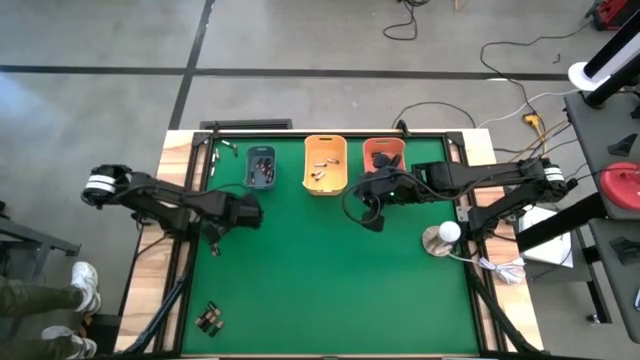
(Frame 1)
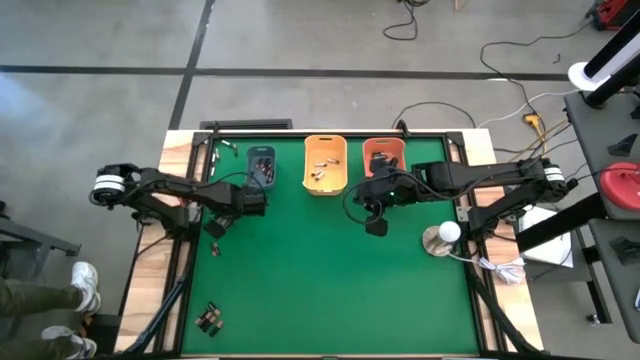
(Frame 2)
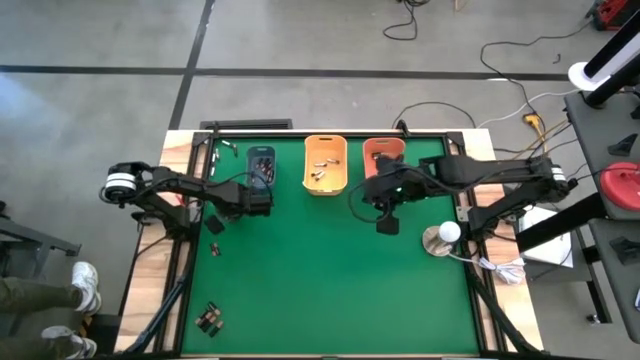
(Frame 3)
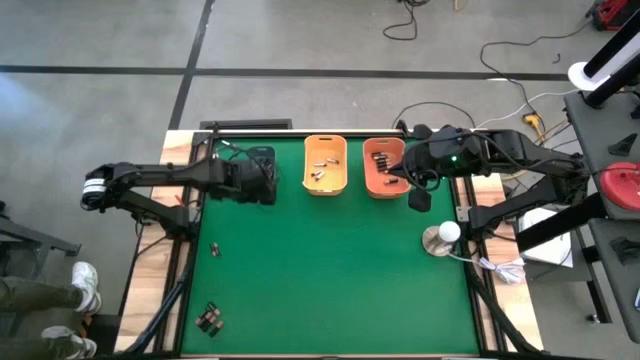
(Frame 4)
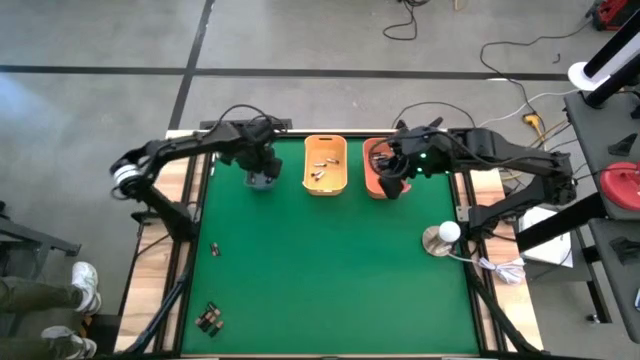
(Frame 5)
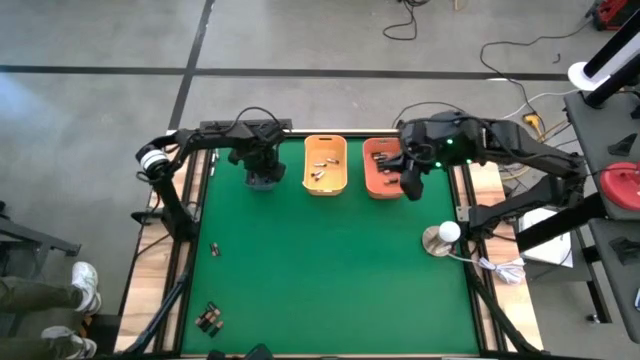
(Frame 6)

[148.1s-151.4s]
Task: Sort batteries
Put the black battery into the blue bin

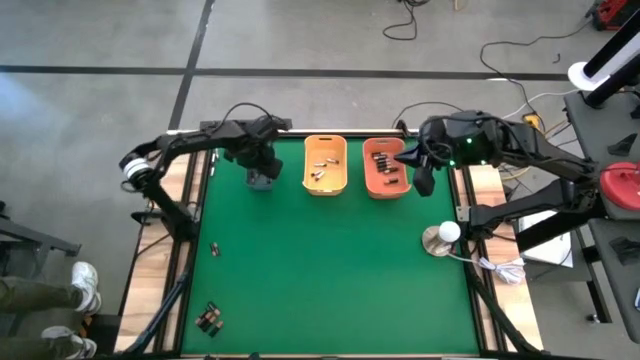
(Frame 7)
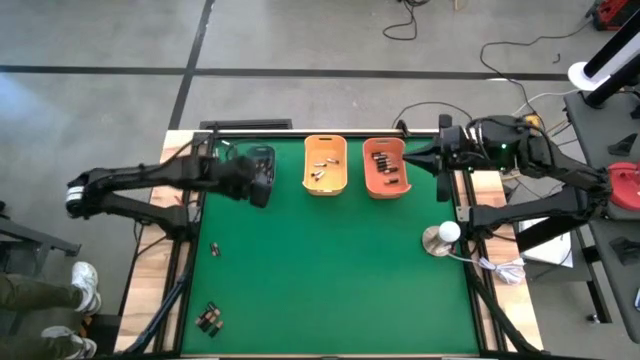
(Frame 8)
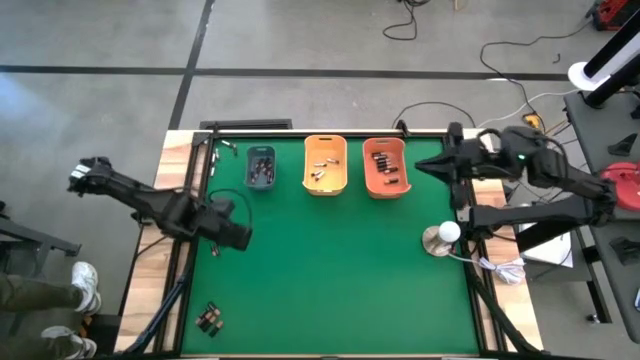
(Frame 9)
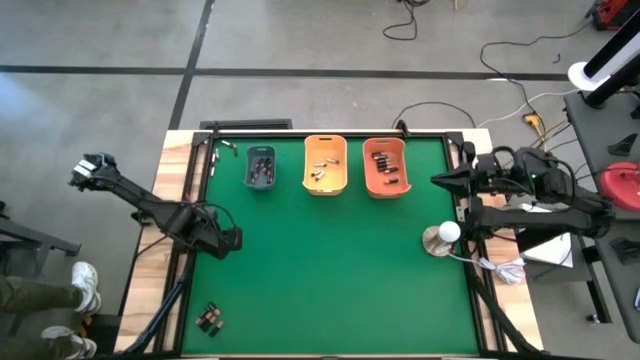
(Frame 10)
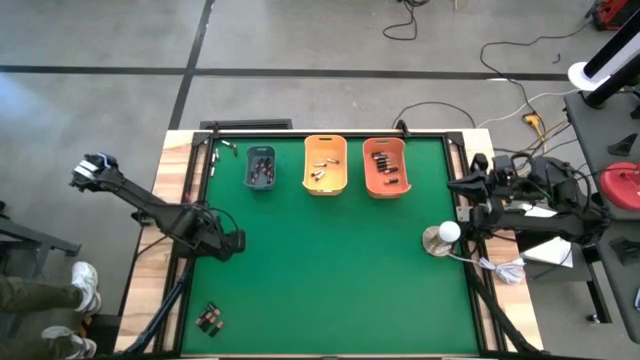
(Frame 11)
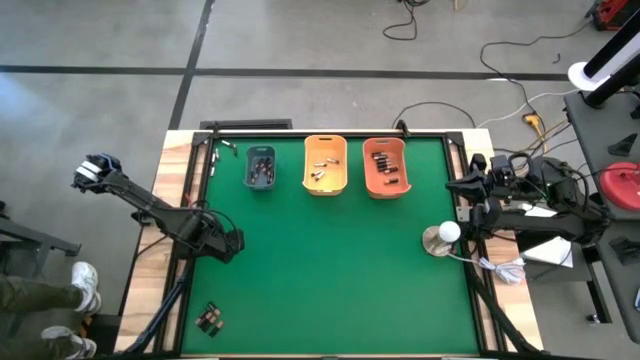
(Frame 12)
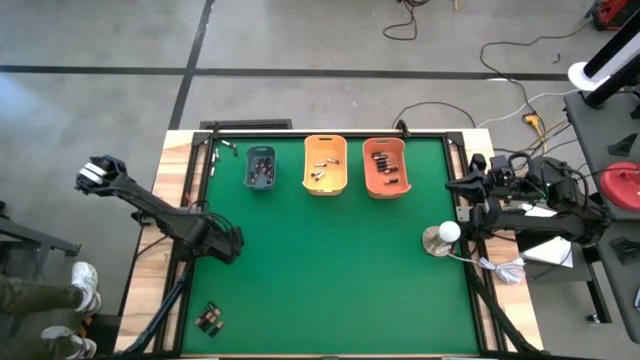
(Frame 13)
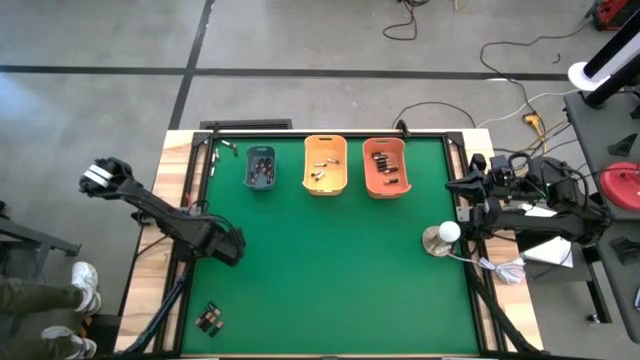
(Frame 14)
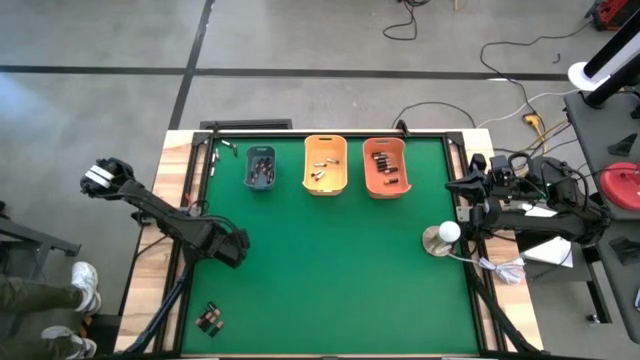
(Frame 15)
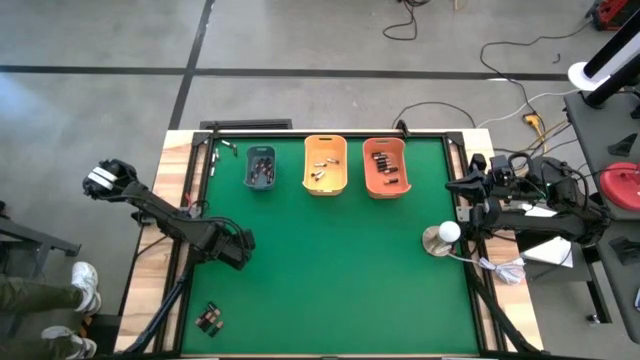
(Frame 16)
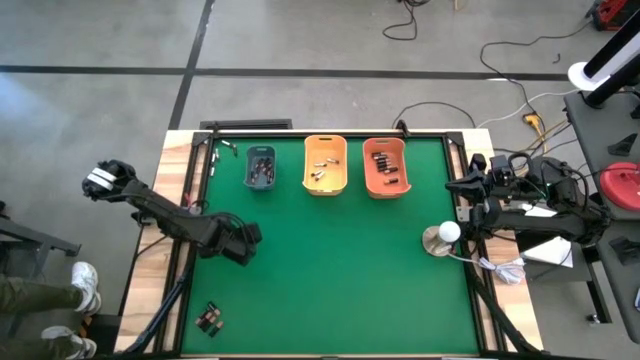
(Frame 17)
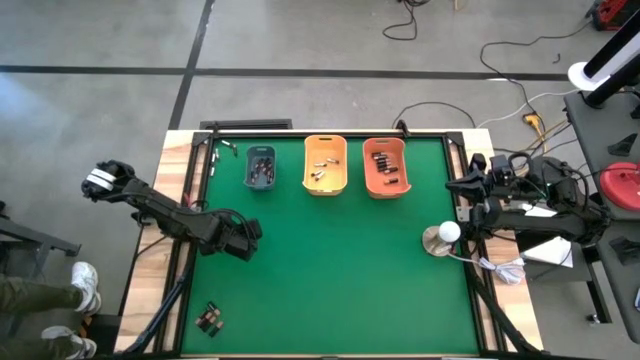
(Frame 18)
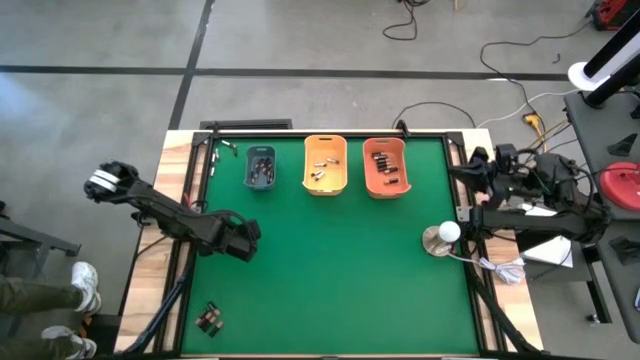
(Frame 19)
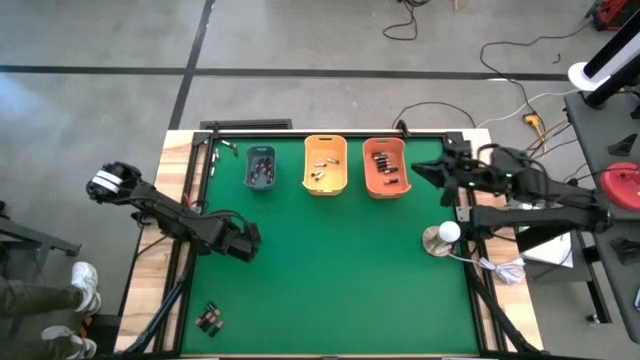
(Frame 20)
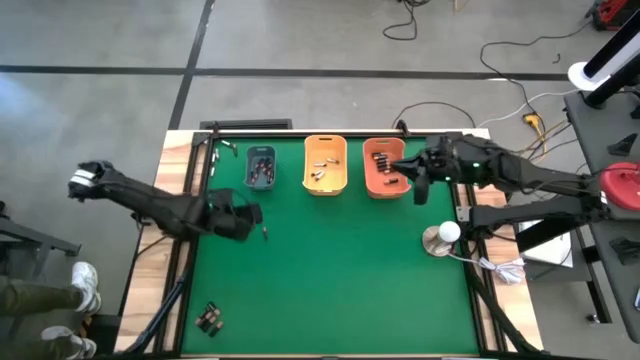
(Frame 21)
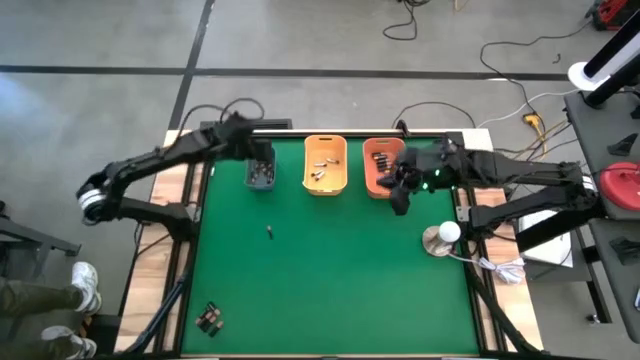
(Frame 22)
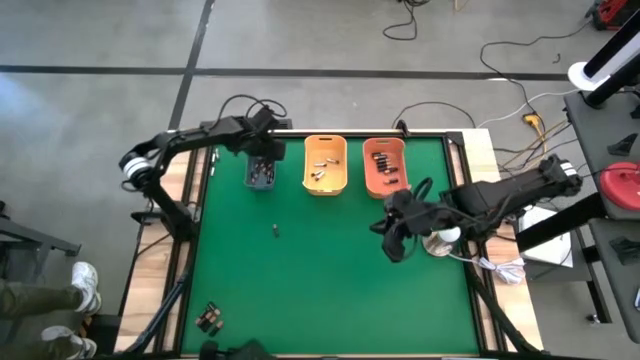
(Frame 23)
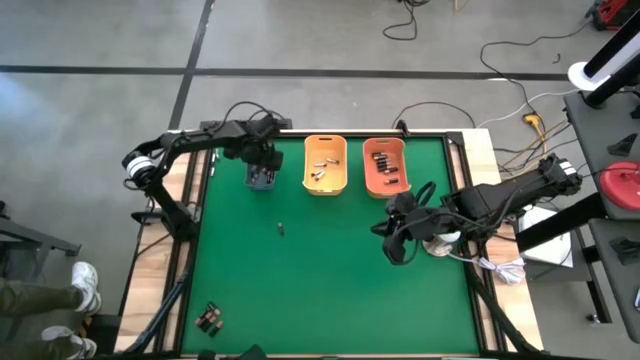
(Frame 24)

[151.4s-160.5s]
Put the black battery into the blue bin

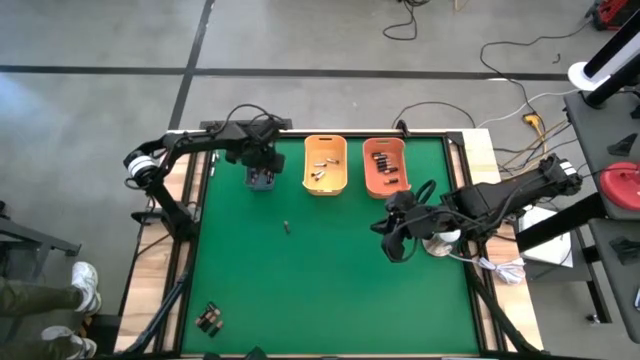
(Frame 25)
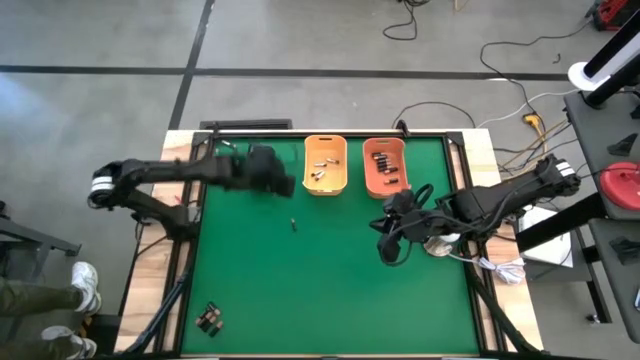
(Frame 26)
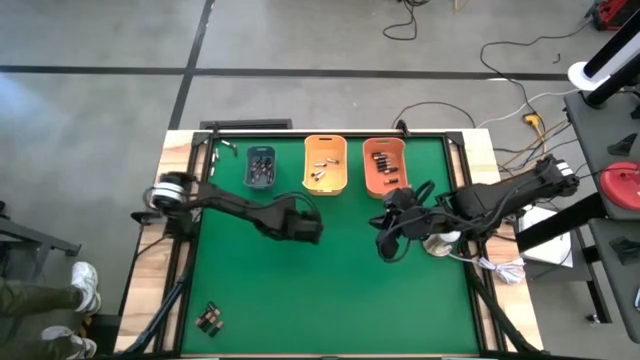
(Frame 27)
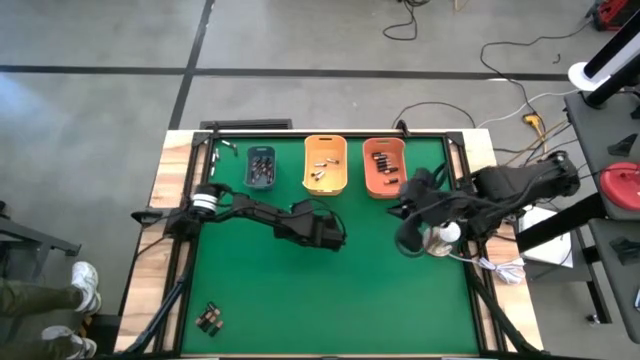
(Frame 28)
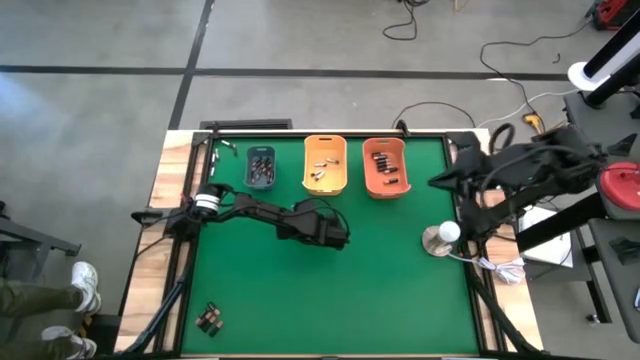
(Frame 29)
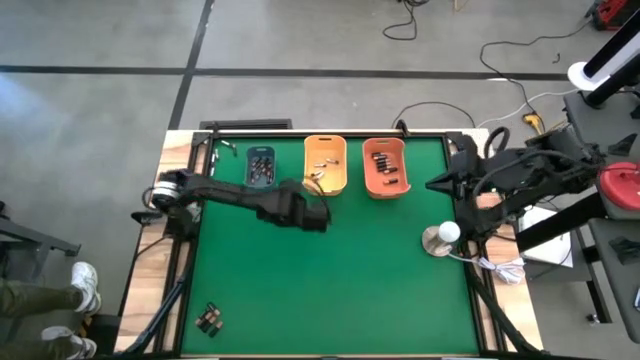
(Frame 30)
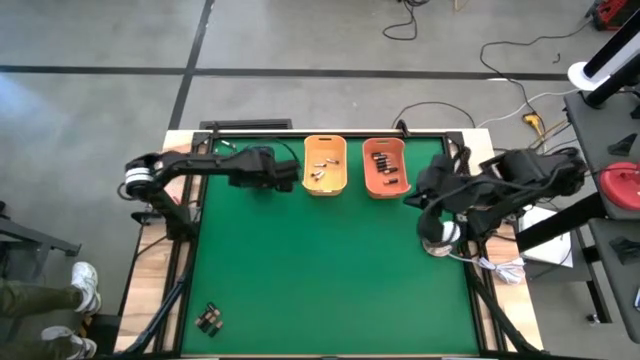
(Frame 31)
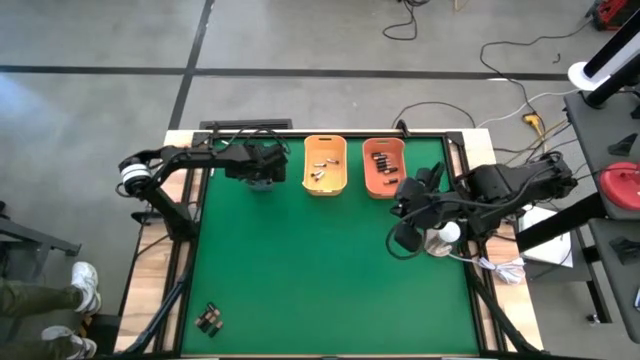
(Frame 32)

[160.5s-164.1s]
Put the black battery into the blue bin

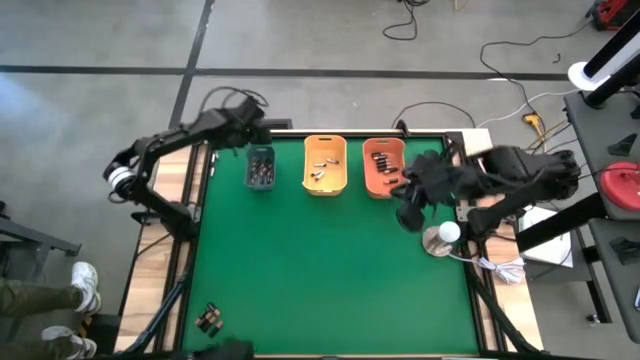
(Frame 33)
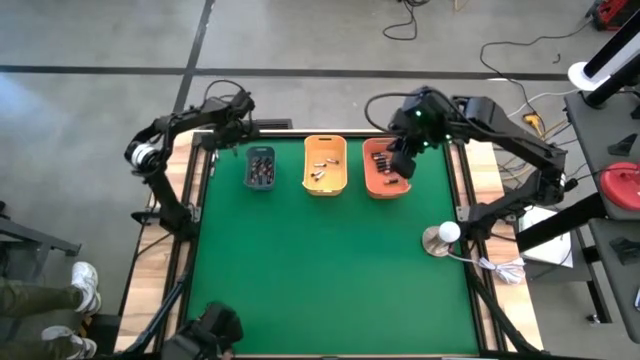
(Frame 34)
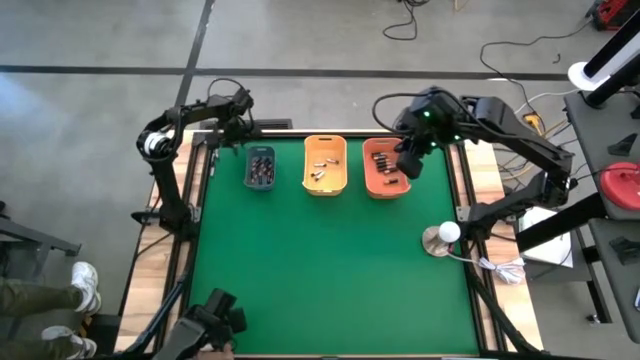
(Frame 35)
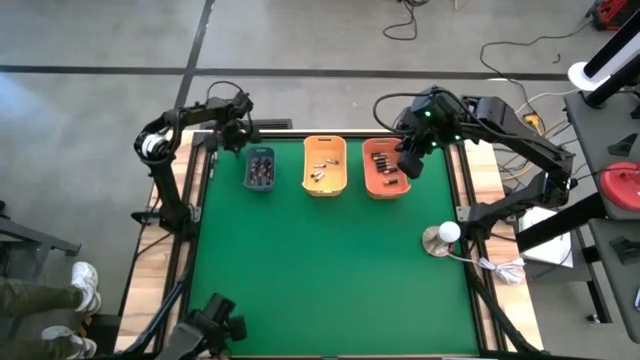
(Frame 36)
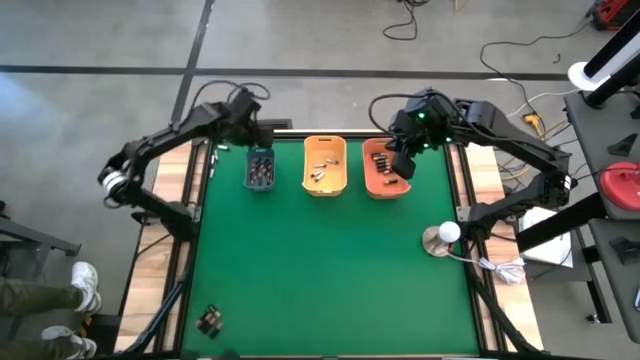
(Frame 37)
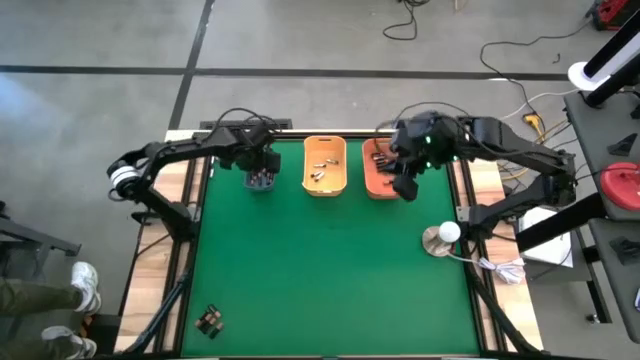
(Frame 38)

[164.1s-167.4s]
Put the black battery into the gray bin

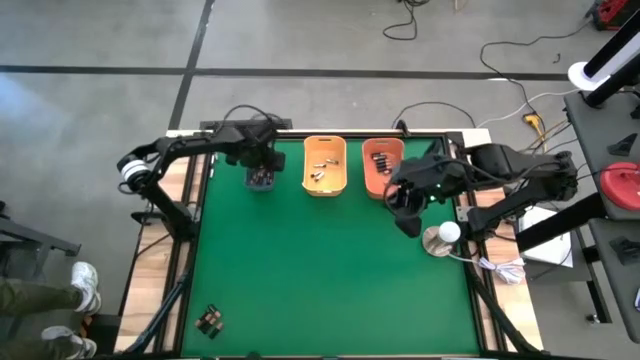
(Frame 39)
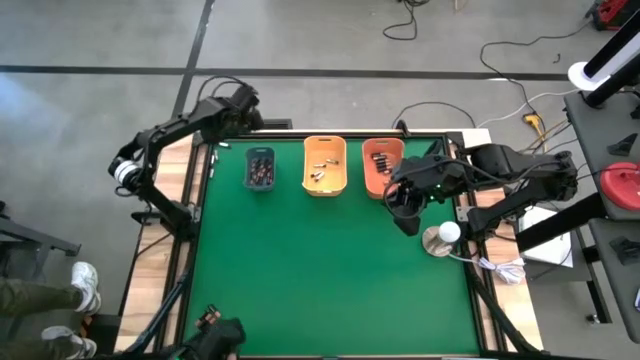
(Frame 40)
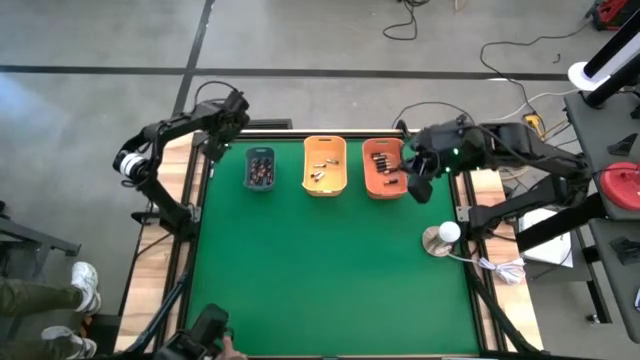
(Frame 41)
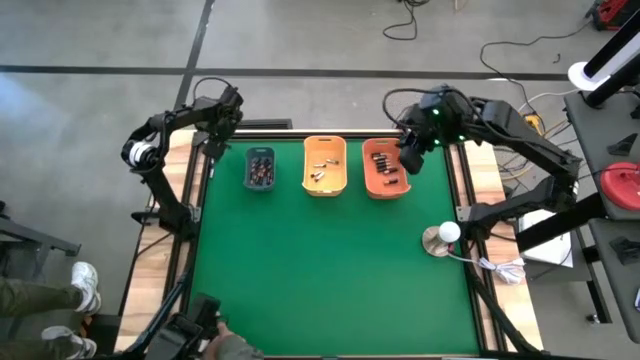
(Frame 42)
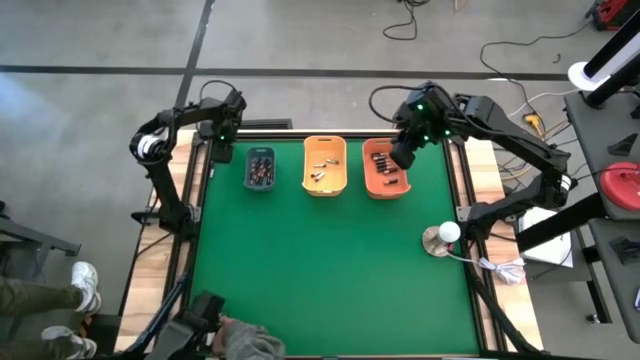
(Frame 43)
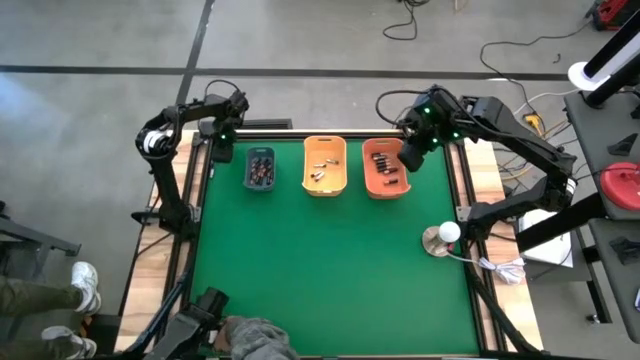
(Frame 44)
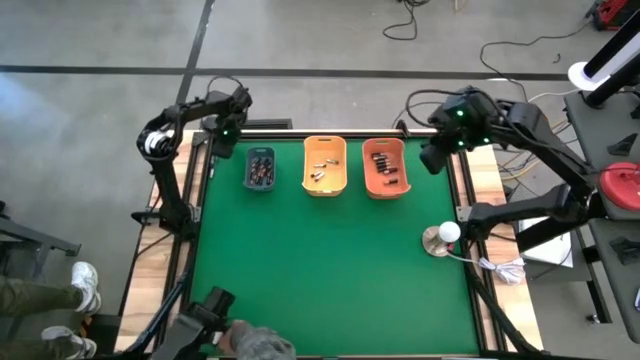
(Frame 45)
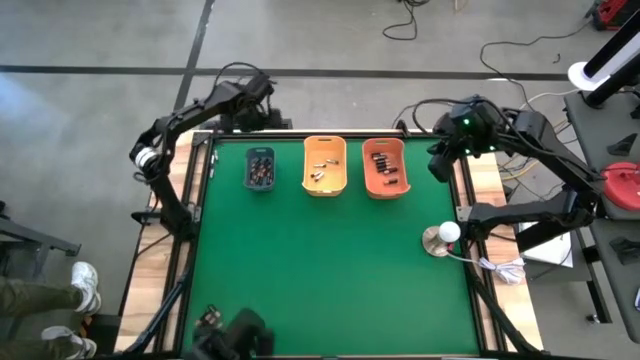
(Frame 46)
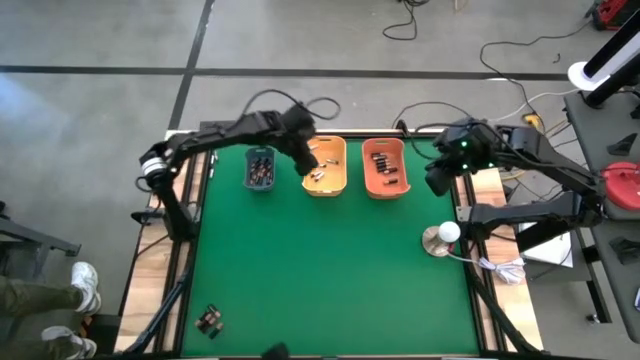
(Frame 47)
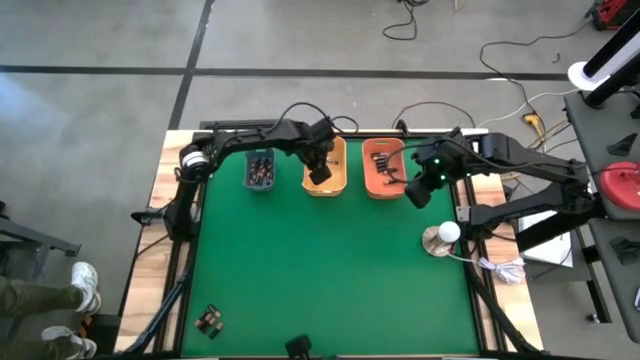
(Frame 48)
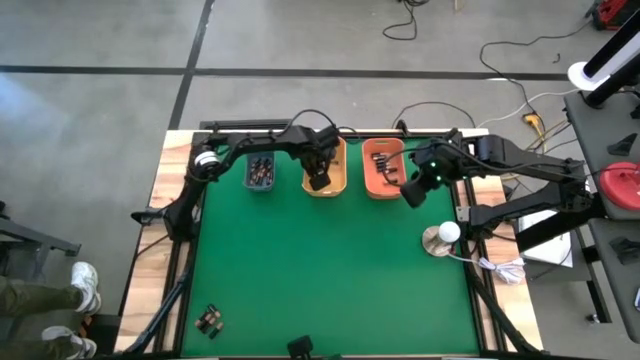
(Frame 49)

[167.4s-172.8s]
Put the top silver/black battery into the yellow bin
